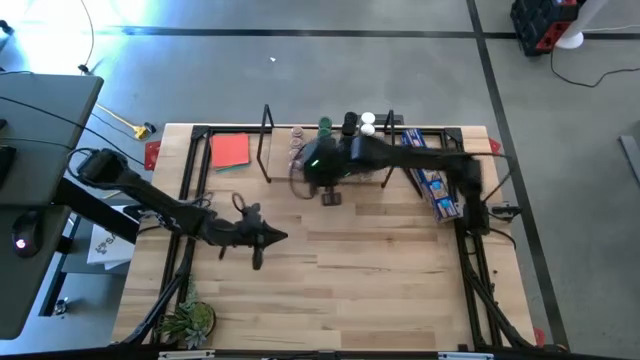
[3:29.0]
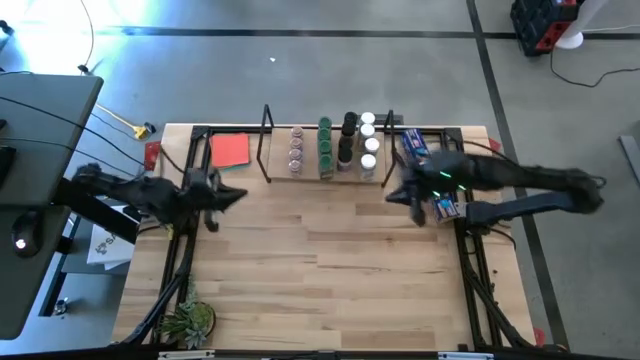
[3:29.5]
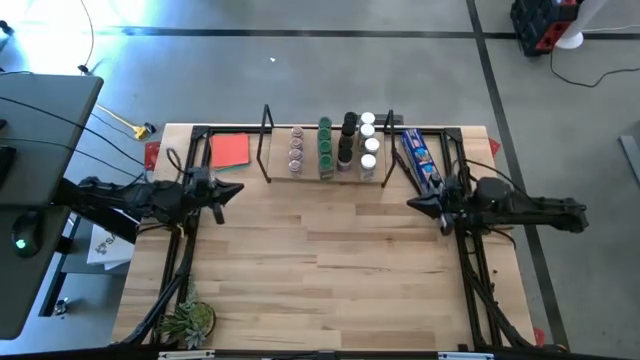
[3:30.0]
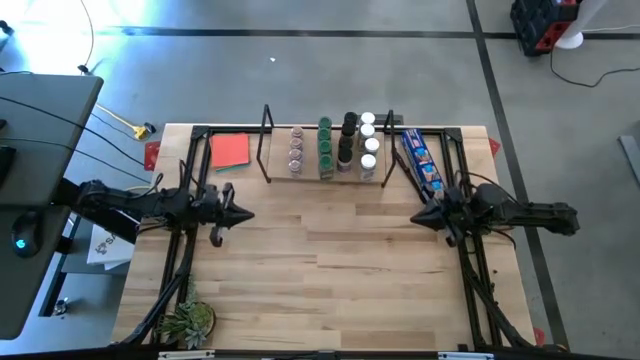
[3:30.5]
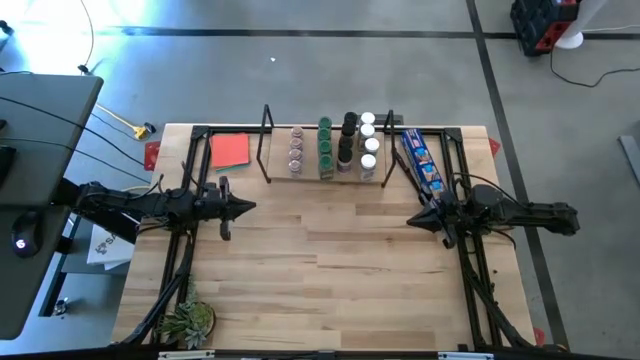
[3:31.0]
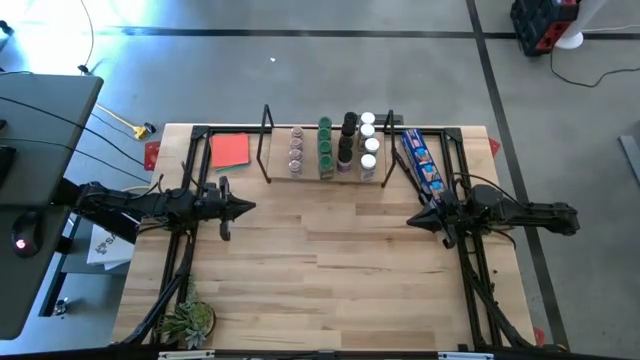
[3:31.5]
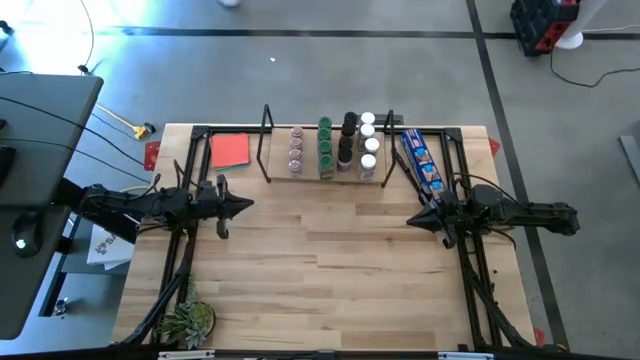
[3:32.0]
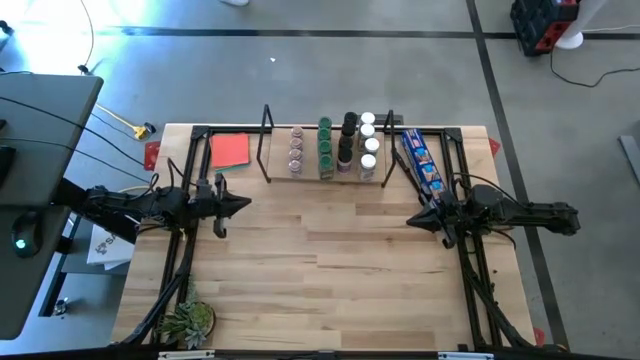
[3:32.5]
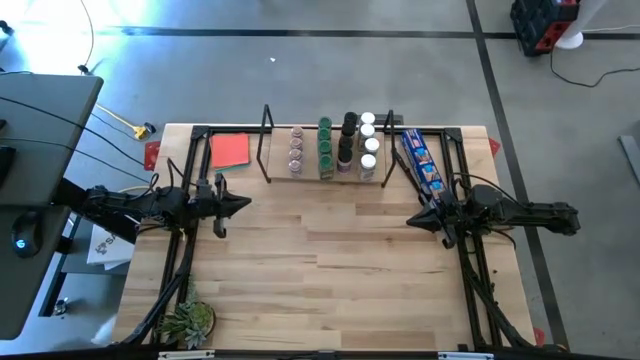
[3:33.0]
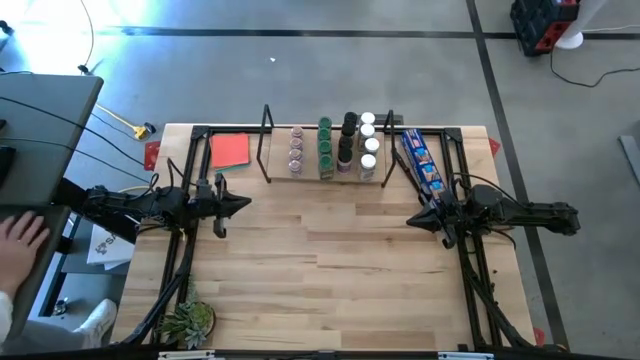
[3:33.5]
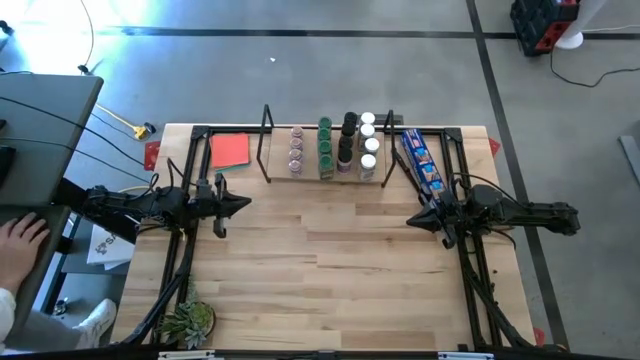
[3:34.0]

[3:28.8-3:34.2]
Task: Shelf spices
Return to Home Position
